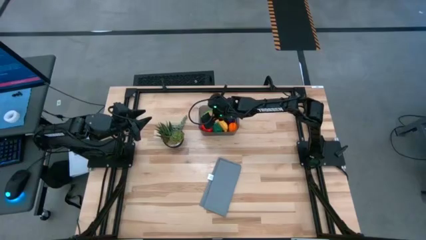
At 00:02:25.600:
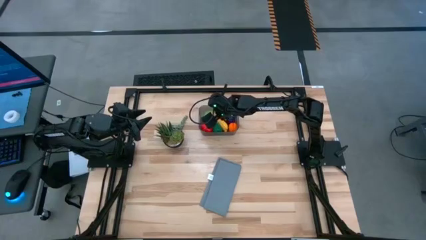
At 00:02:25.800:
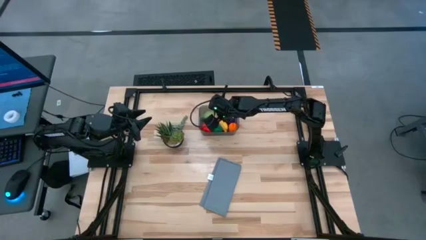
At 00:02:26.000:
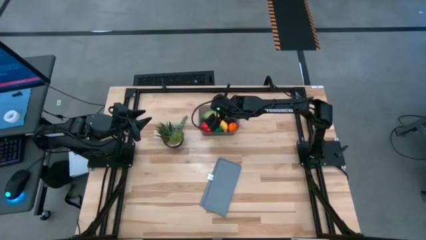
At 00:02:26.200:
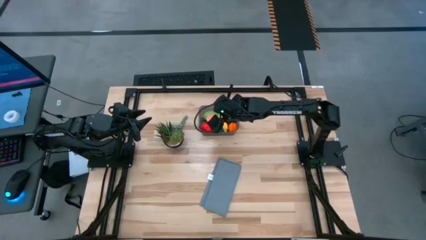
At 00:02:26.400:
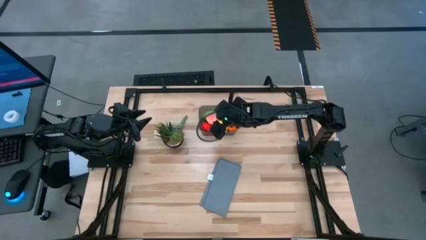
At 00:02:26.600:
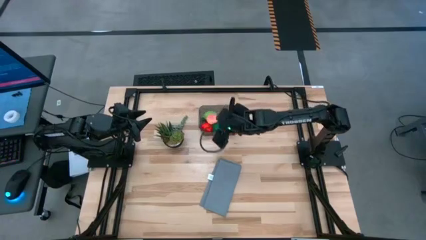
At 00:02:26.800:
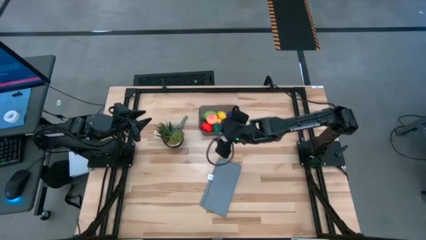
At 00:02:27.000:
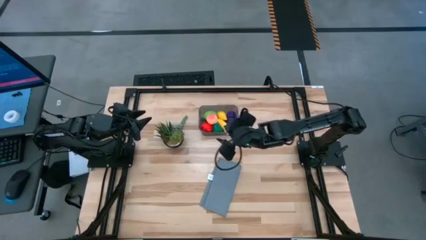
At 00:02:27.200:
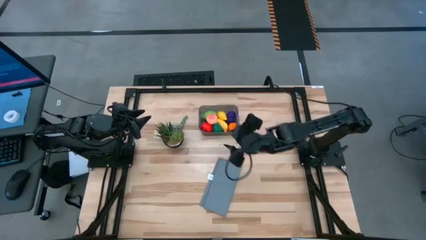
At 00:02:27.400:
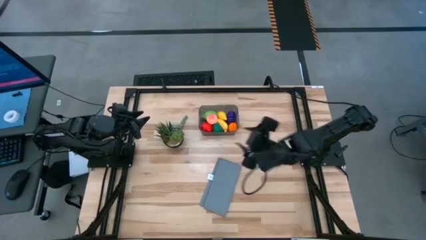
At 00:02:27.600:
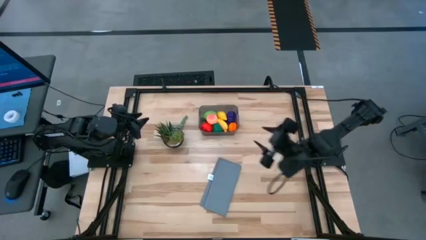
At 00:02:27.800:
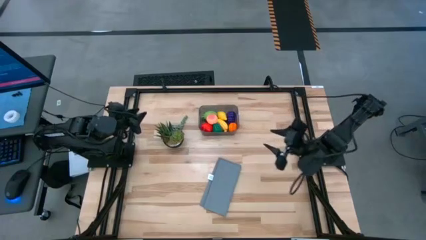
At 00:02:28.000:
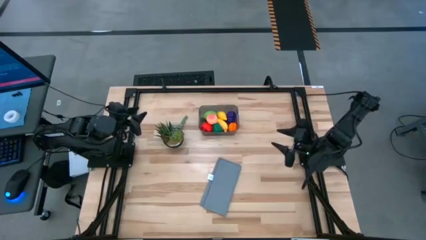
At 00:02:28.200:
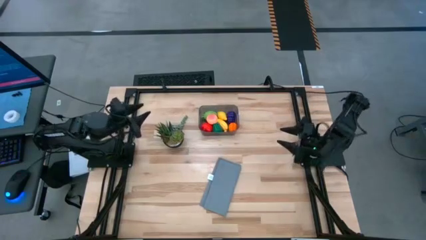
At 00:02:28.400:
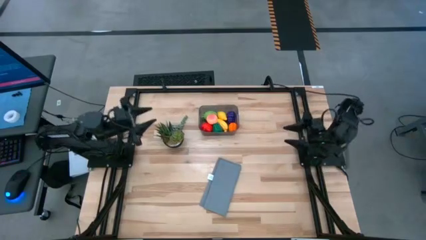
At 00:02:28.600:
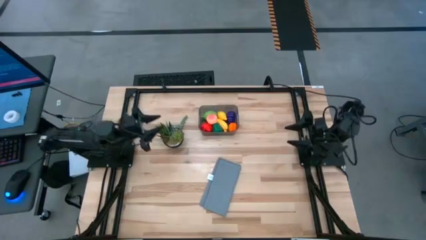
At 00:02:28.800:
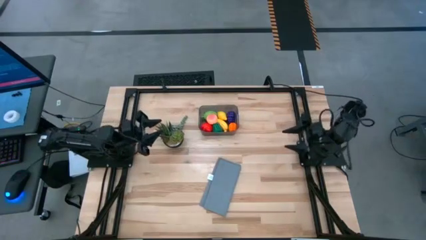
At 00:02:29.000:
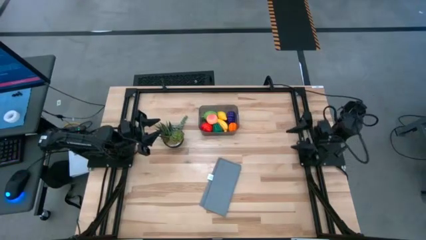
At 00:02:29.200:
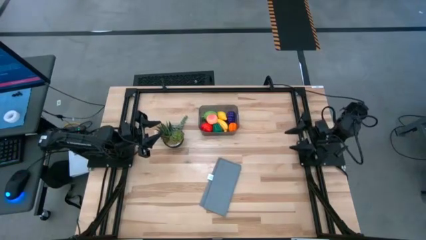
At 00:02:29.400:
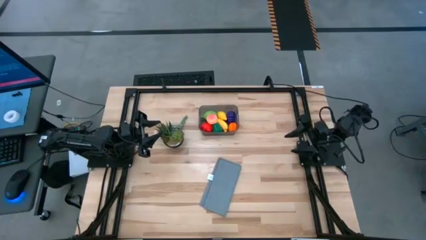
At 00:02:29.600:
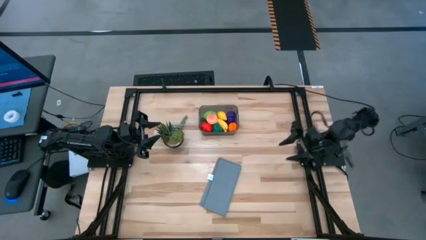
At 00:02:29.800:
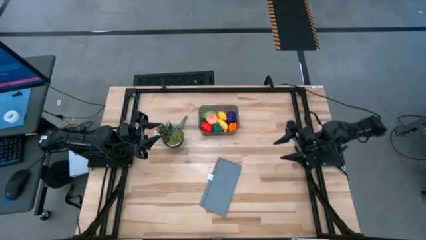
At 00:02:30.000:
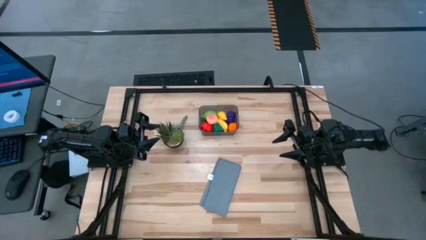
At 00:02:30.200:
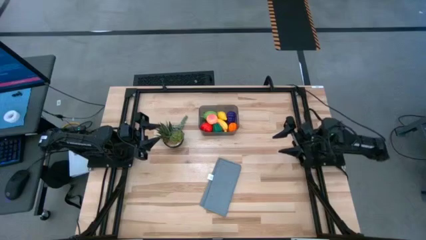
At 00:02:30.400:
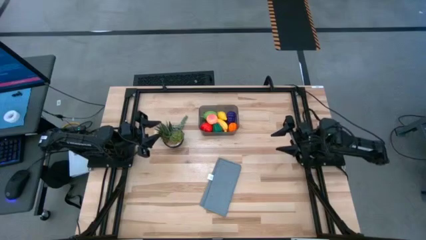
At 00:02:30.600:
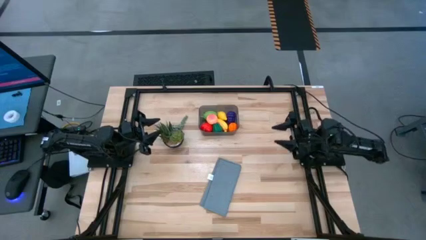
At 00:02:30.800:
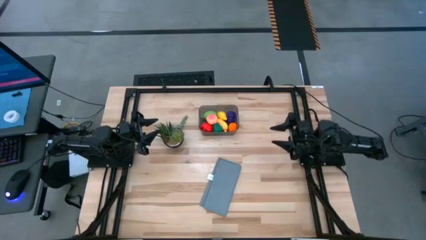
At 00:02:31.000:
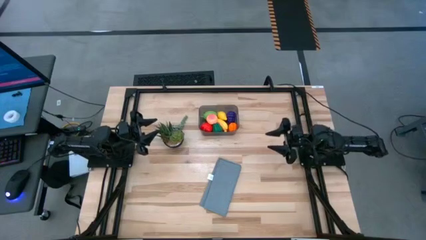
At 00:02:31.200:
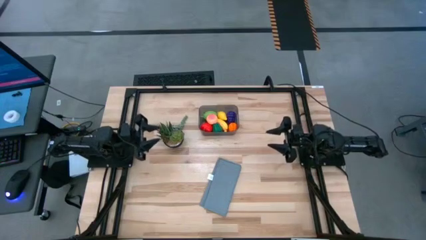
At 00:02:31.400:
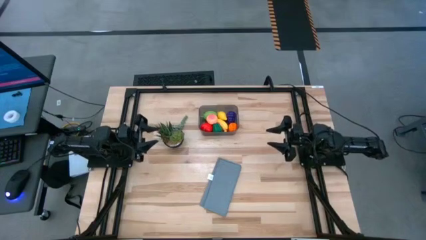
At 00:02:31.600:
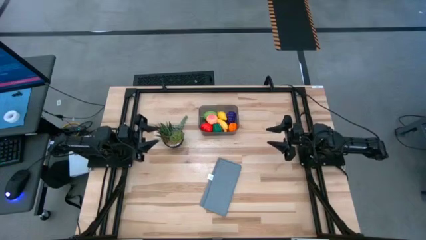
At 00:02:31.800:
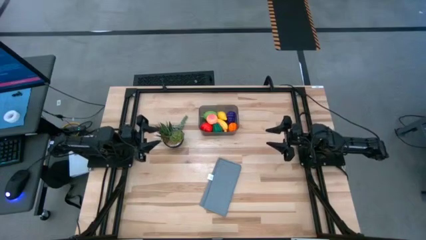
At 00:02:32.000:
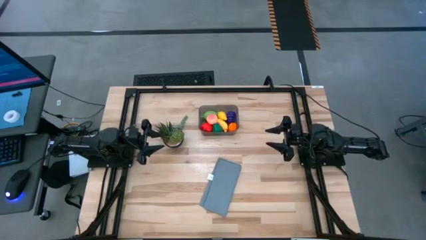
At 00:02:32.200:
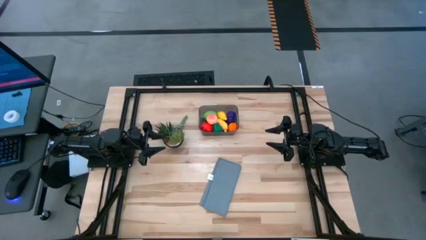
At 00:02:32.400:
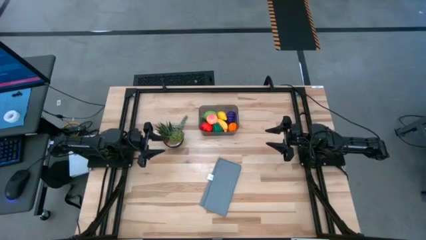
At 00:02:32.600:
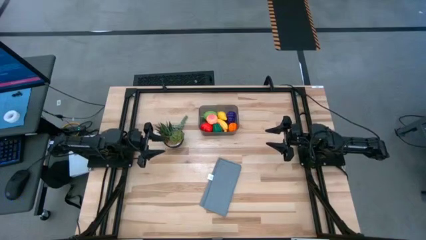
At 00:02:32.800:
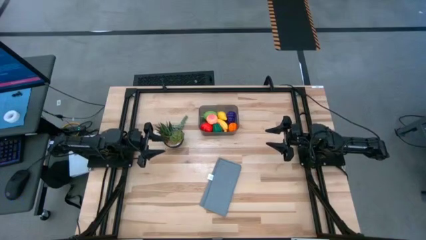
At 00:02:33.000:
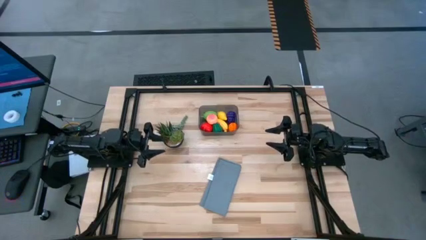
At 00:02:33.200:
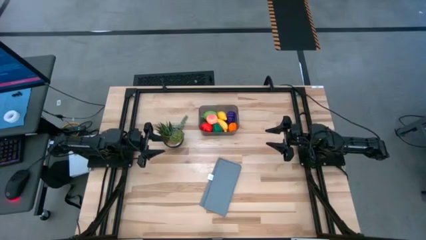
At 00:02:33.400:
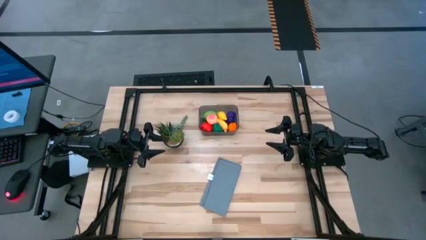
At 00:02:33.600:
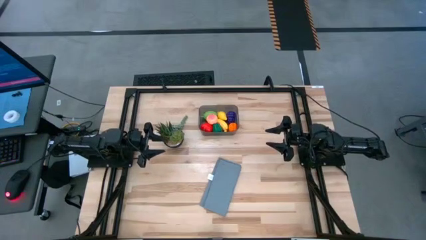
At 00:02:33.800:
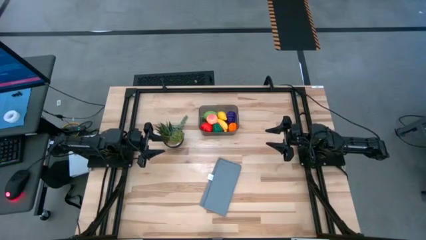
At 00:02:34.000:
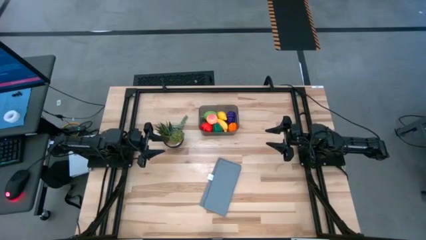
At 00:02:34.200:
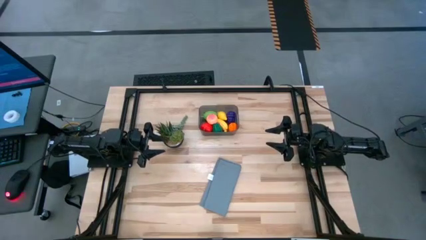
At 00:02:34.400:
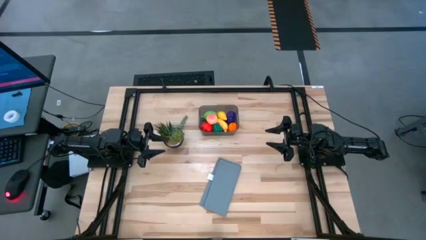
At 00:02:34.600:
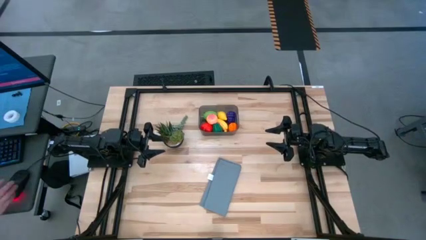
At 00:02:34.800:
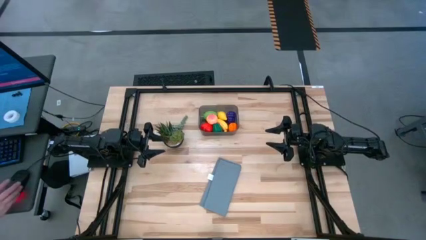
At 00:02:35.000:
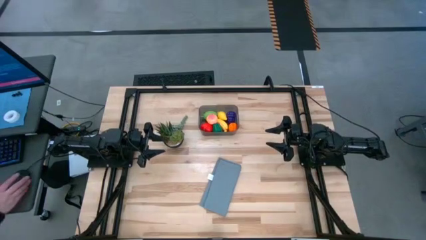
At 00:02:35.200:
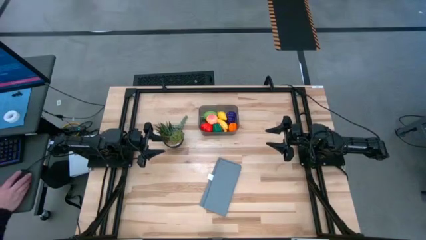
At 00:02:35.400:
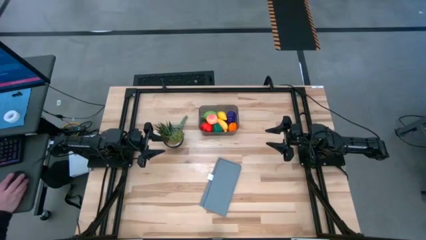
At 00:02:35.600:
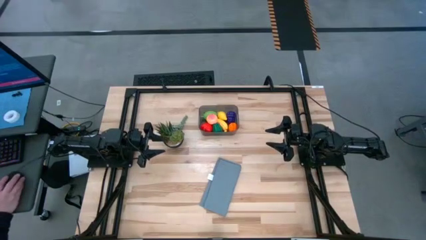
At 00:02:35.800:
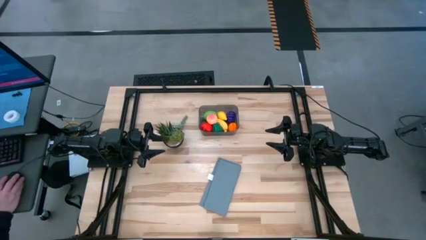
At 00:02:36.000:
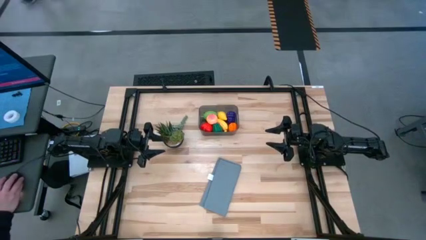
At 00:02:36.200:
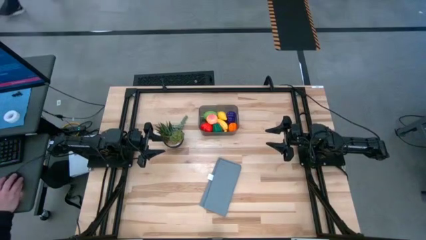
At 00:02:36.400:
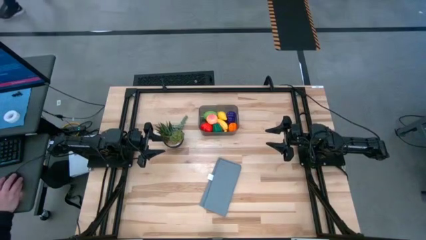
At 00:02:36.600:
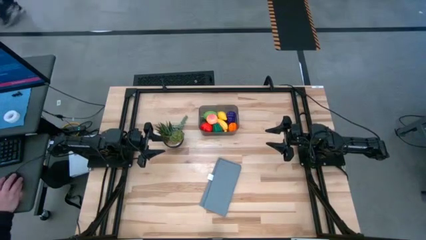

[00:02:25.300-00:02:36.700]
Task: Pick and placing Produce into tupperware
Return to Home Position

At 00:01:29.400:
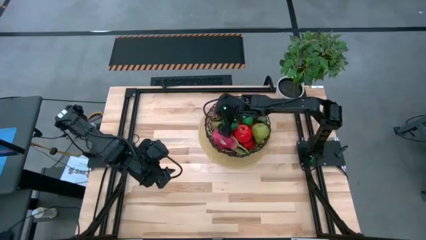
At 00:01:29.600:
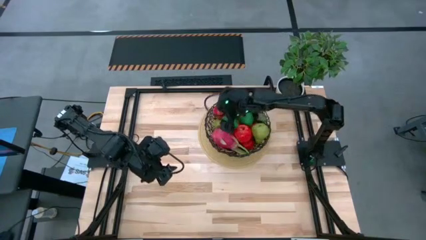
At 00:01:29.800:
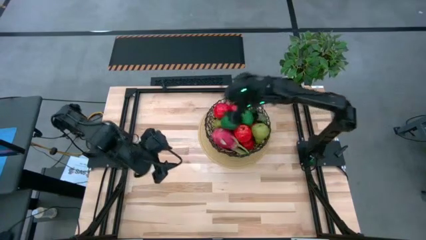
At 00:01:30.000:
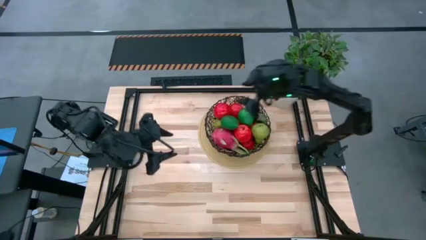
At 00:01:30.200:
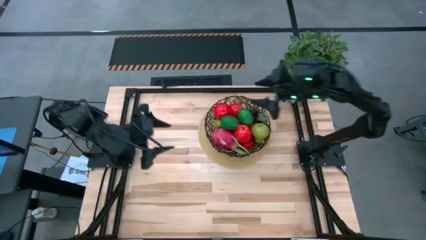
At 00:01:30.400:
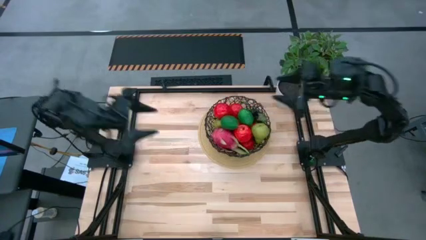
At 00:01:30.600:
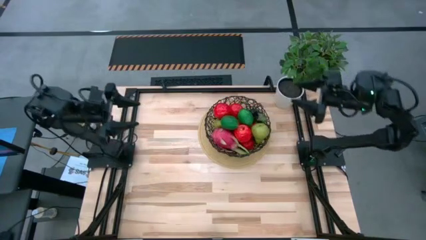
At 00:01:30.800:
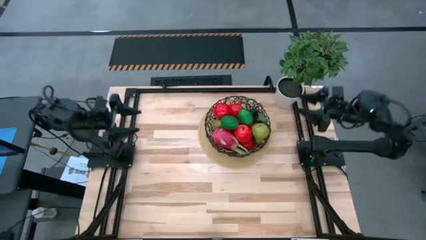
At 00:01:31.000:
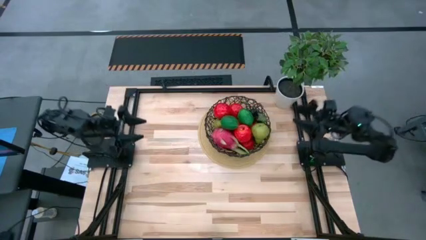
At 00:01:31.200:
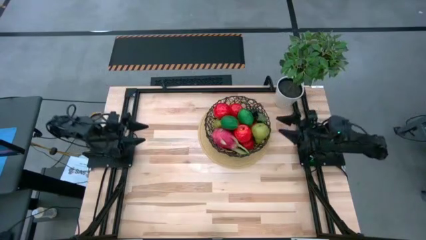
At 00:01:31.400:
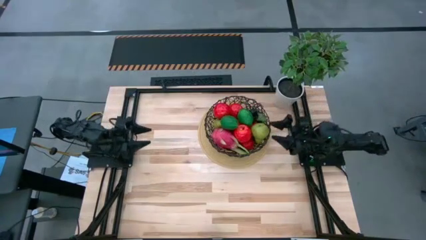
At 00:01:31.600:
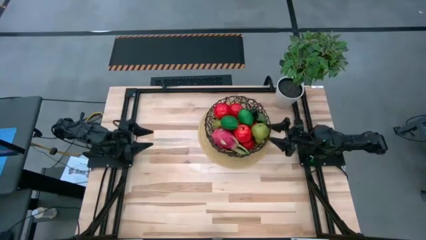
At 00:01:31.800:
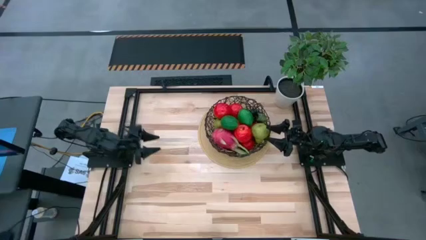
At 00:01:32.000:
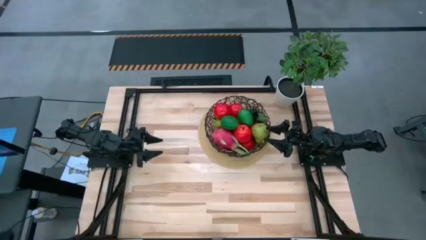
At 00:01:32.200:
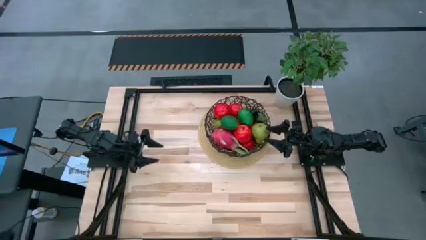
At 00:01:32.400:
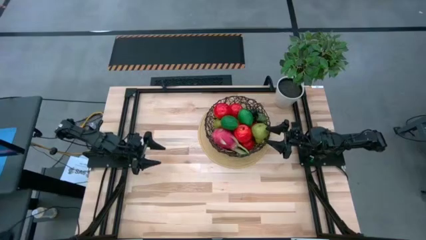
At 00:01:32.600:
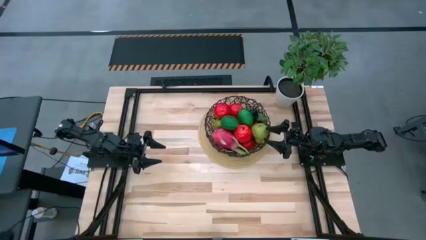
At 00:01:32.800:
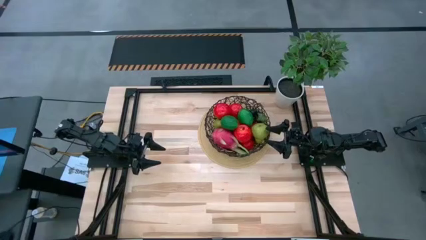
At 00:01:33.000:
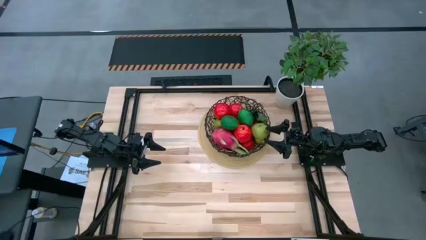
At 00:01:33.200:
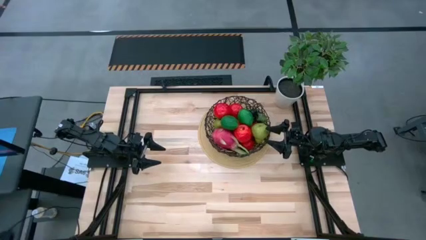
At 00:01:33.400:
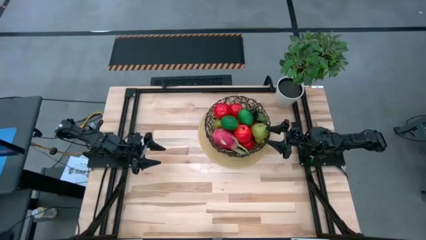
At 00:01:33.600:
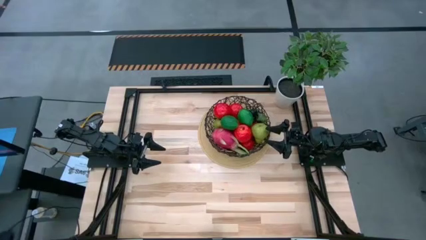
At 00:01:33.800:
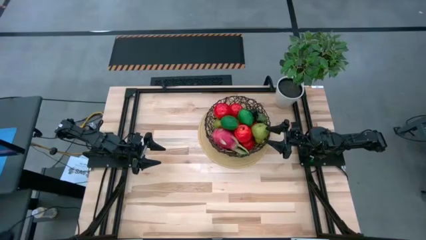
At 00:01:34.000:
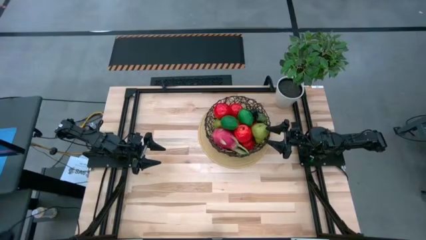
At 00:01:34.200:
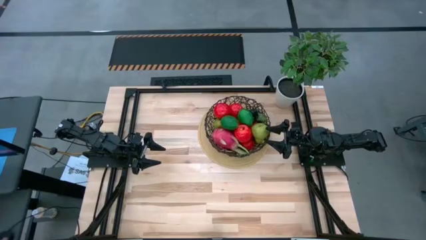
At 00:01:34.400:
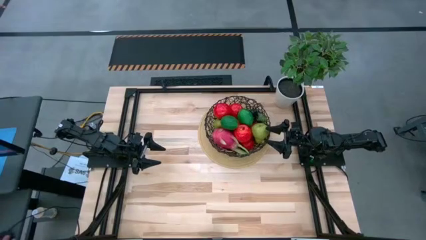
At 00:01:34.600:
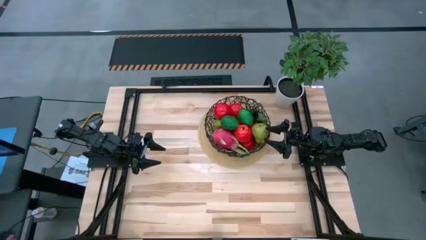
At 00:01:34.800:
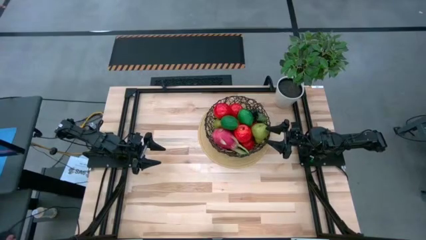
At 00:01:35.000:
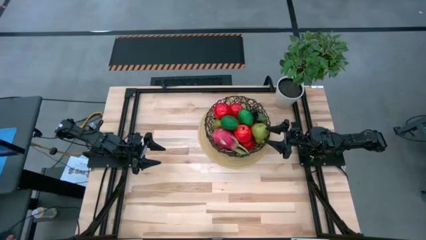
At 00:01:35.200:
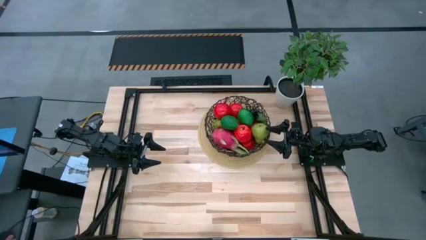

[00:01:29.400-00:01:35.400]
Task: Build produce basket
Return to Home Position
